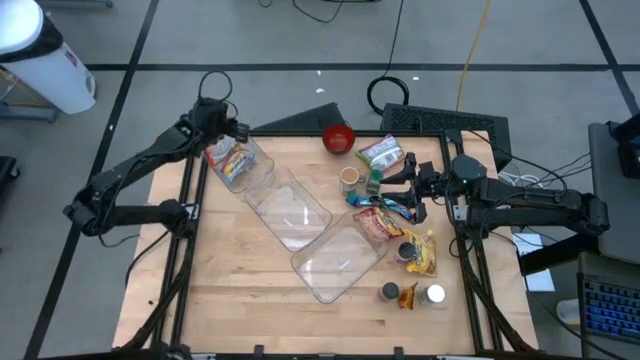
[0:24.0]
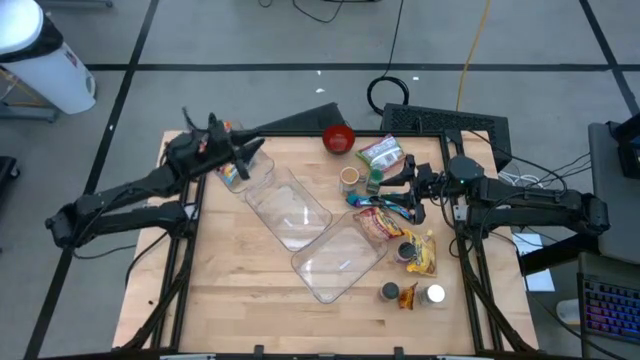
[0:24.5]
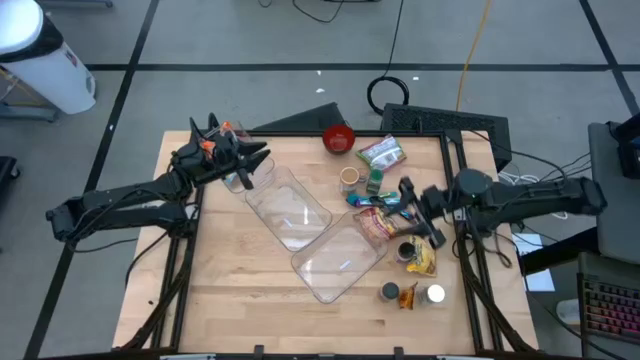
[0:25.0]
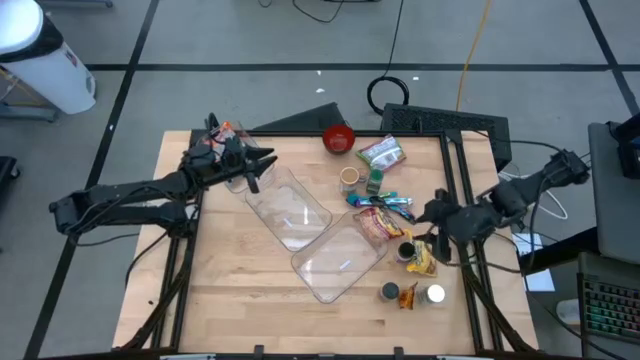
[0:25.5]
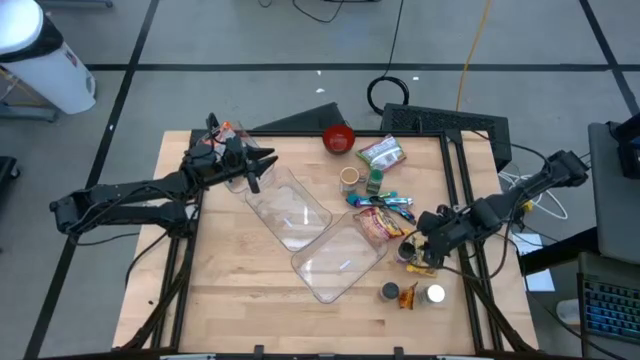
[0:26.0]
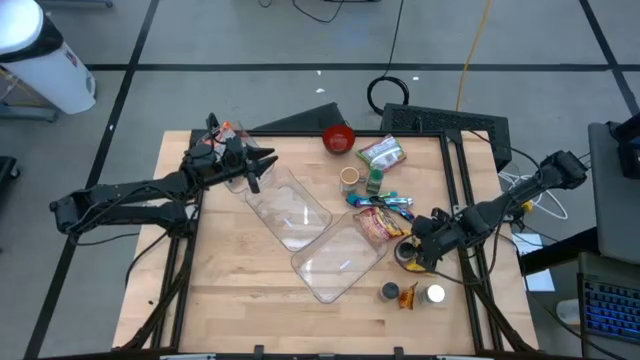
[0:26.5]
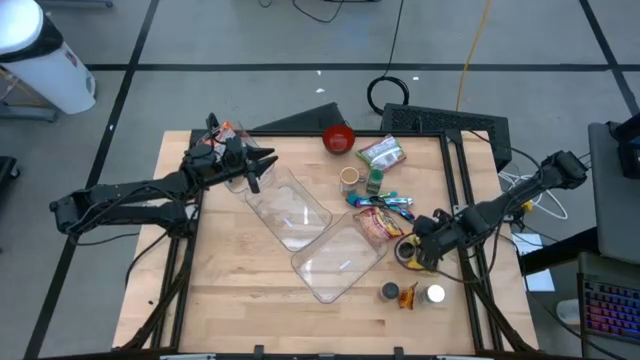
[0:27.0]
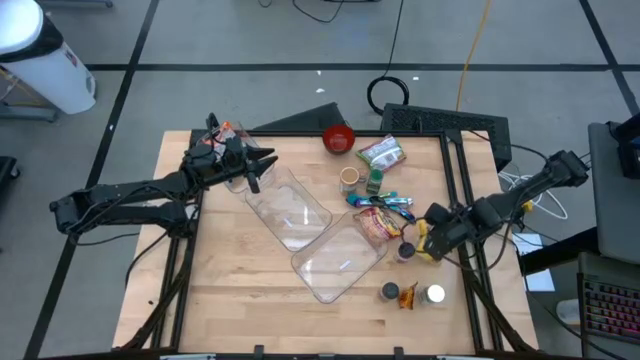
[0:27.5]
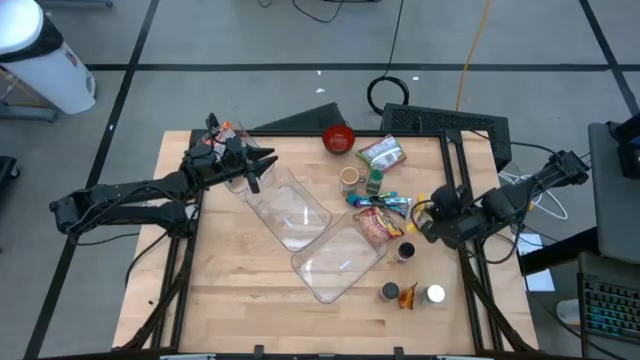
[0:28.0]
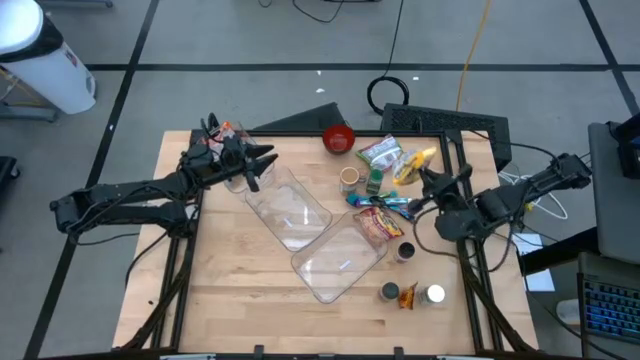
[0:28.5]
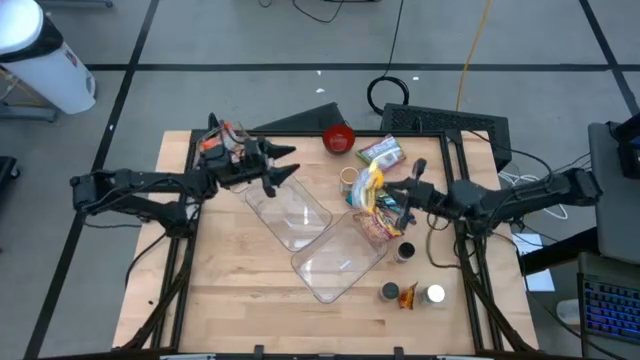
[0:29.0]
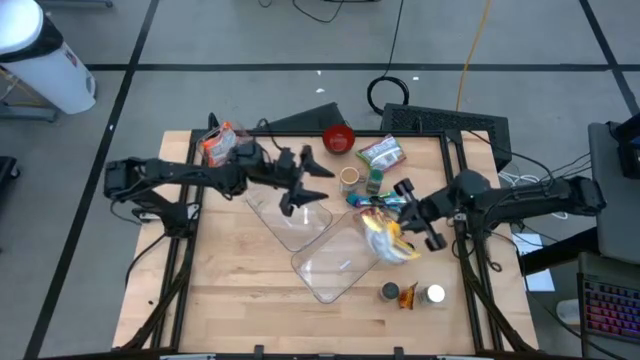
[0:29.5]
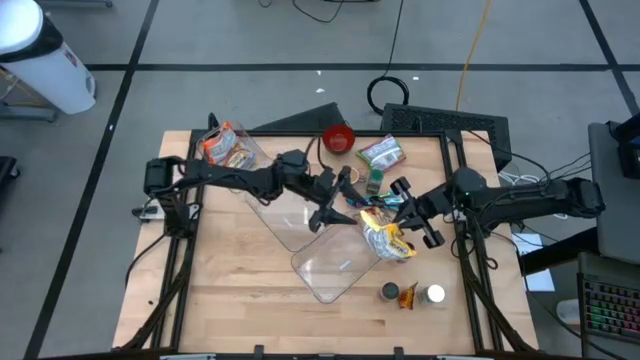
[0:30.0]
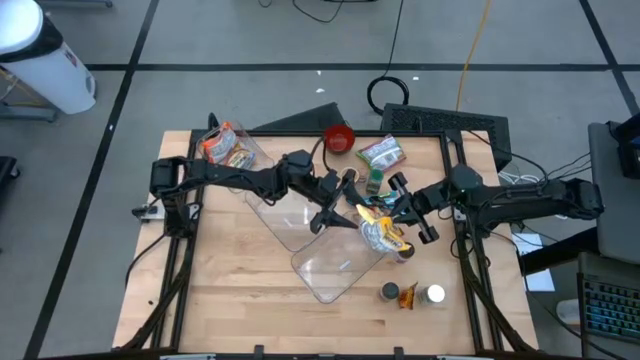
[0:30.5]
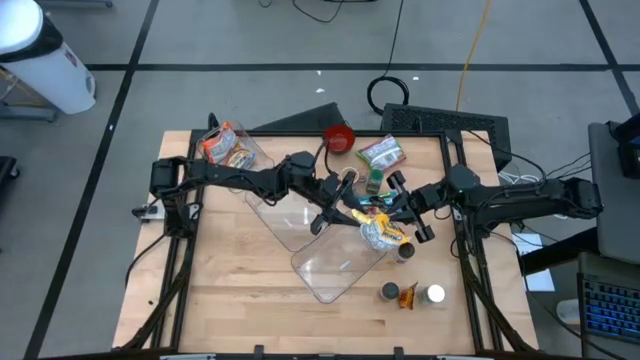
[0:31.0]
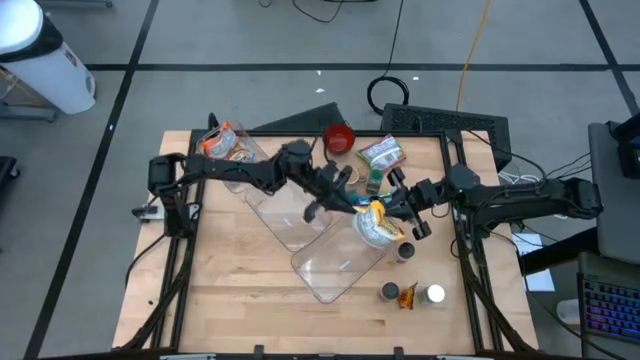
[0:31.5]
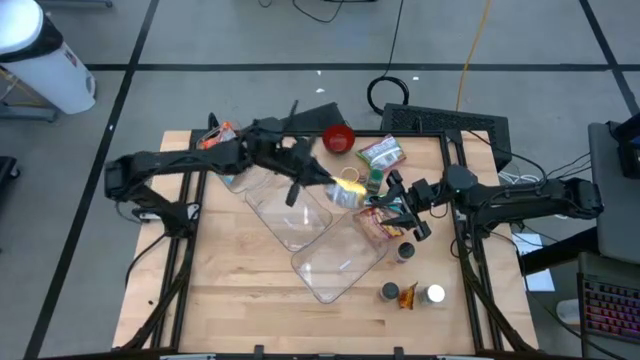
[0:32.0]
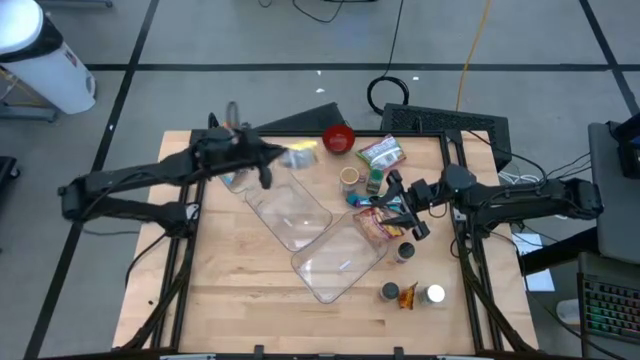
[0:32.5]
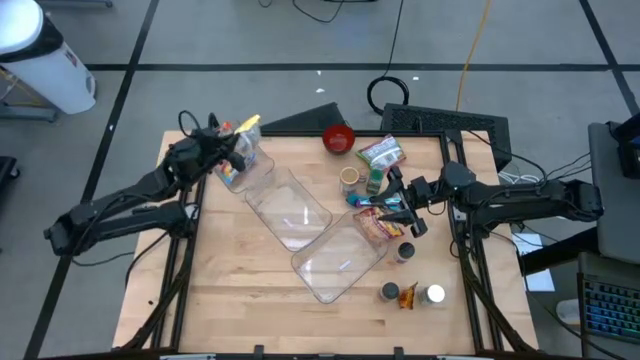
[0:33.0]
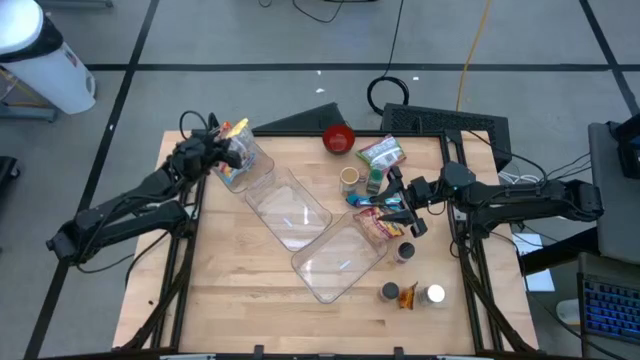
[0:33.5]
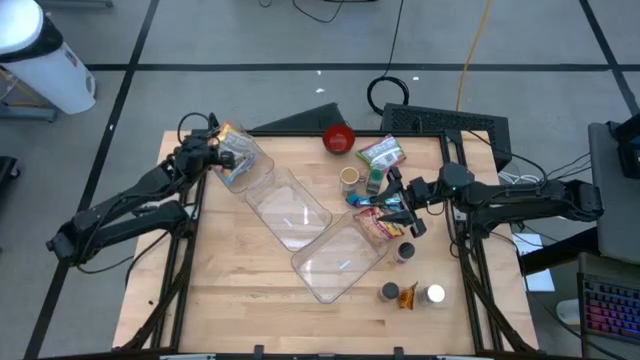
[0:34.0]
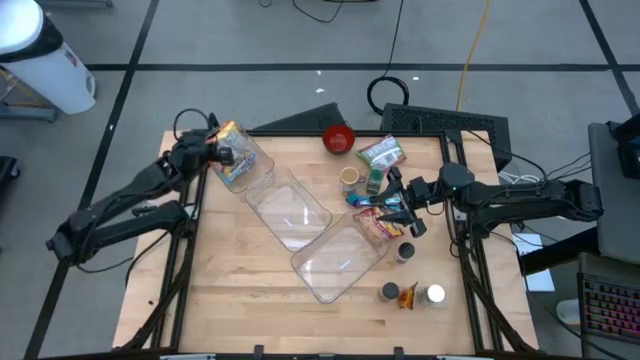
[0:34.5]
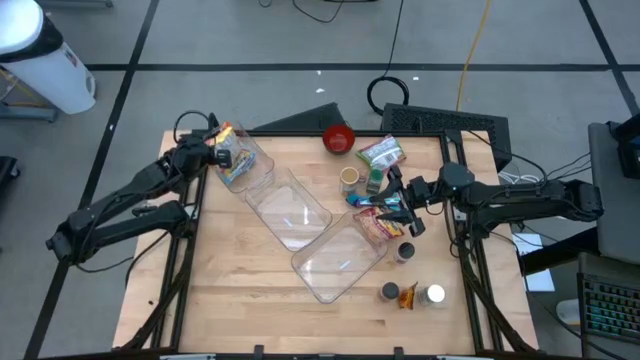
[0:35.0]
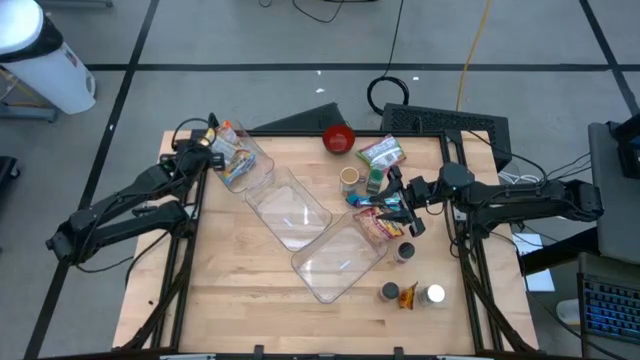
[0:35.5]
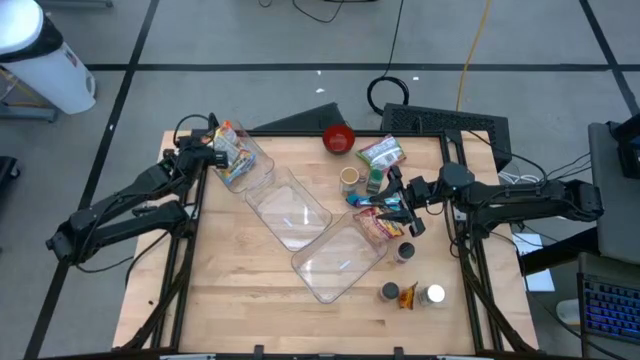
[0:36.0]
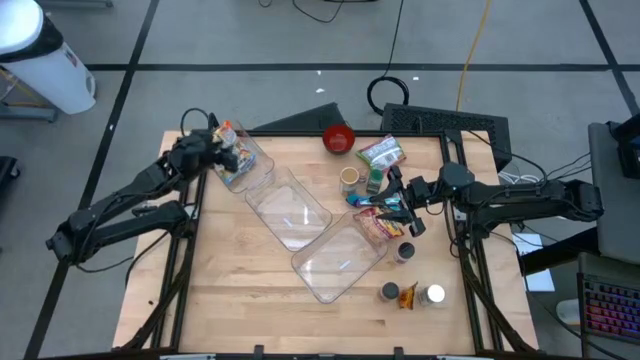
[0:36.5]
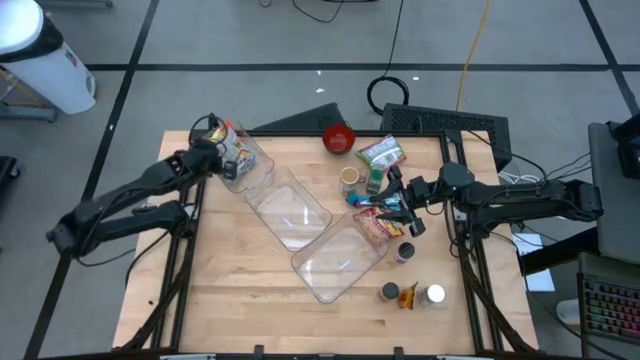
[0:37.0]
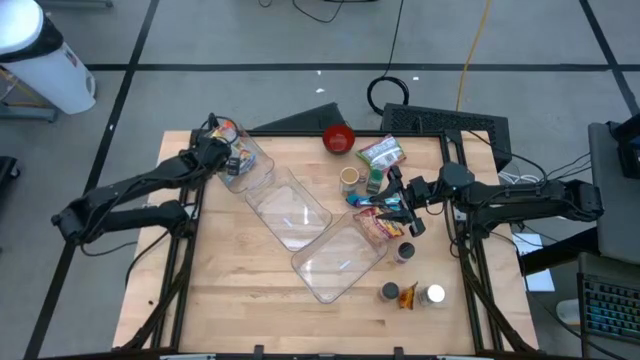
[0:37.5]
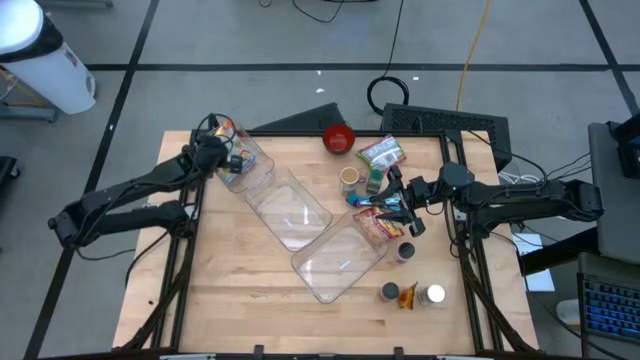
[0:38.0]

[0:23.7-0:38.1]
Task: Pick & Place Food Item
Put the yellow noodle pack into the top transparent bin

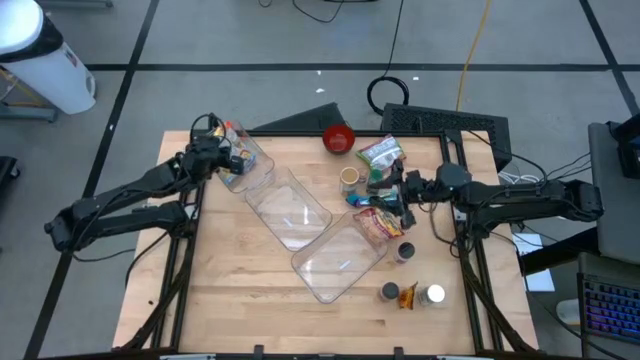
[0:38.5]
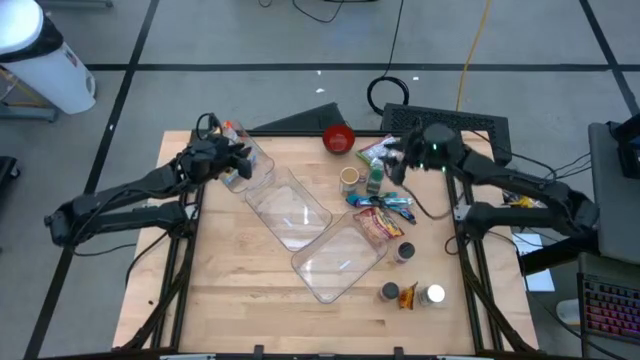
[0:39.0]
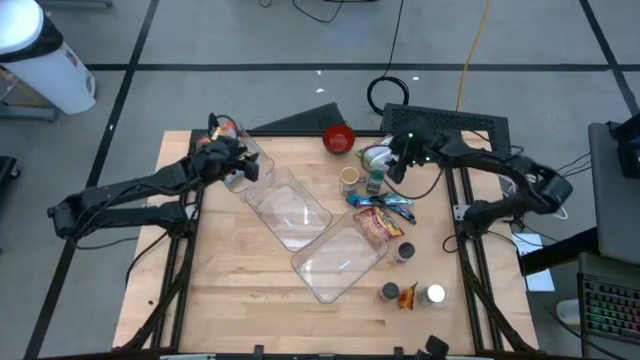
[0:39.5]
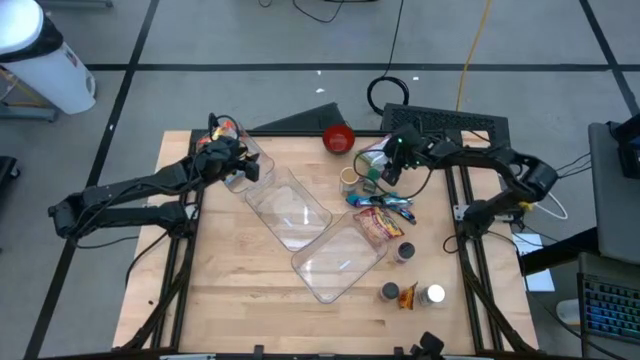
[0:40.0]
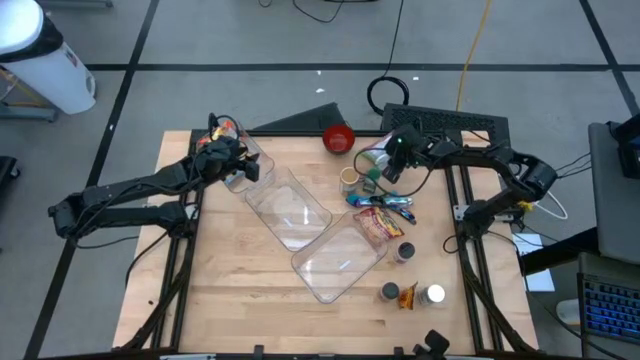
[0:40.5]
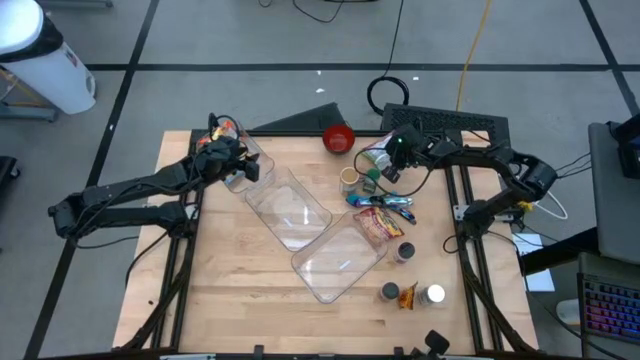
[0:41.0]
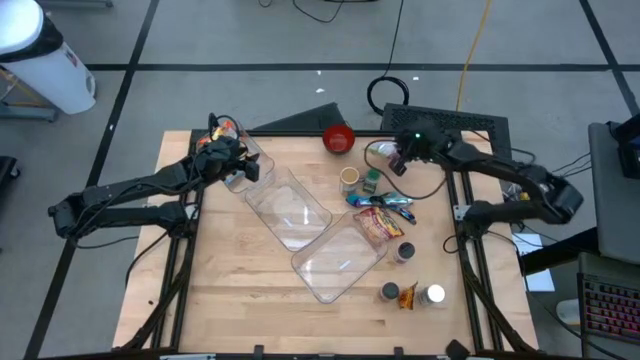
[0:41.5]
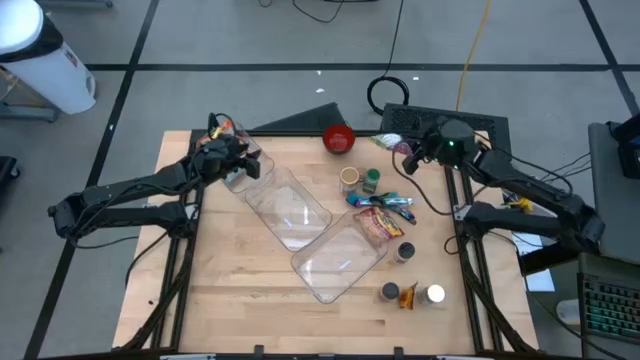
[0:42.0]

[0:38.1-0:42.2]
Put the green noodle pack into the top transparent bin

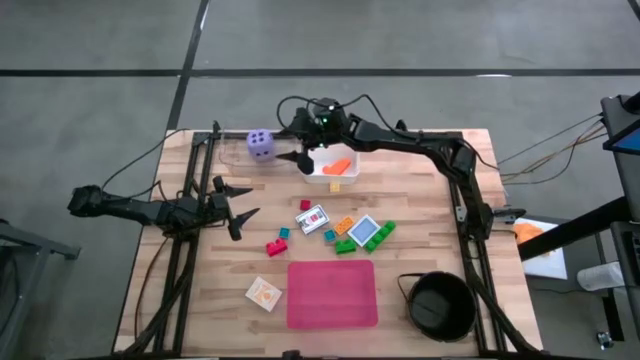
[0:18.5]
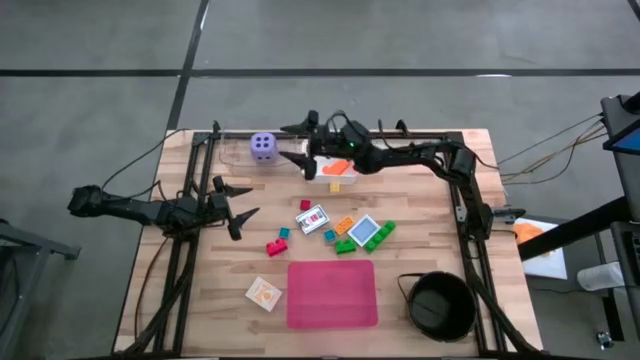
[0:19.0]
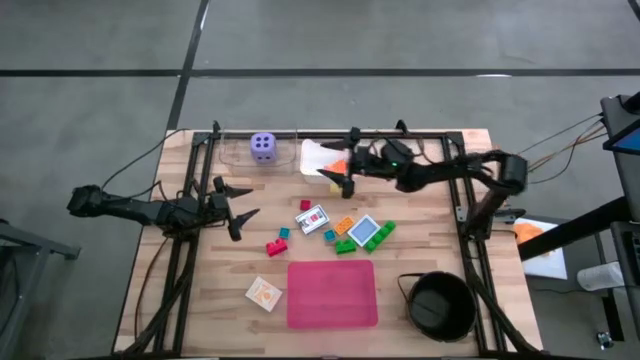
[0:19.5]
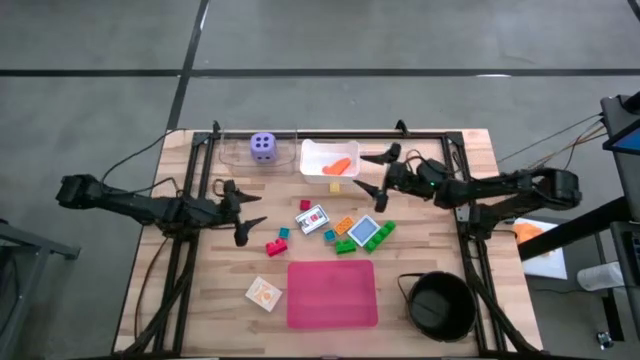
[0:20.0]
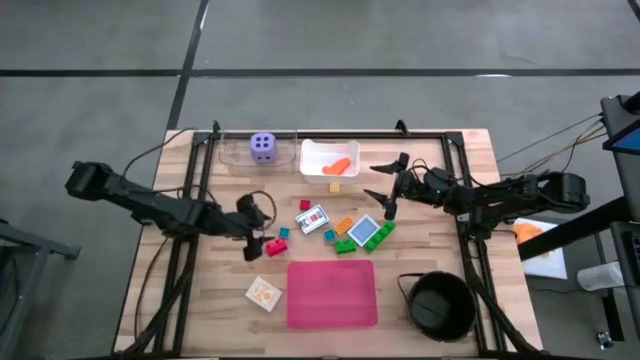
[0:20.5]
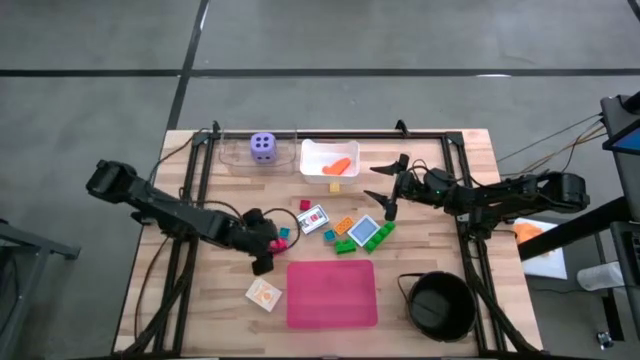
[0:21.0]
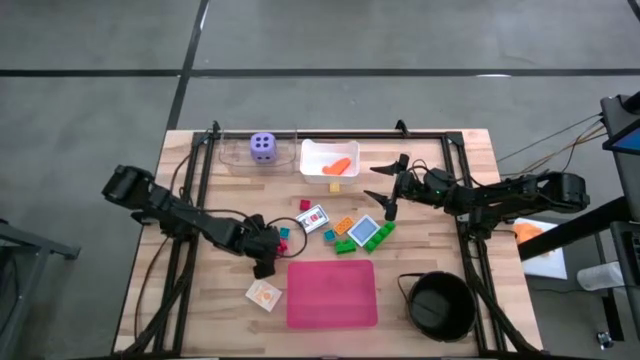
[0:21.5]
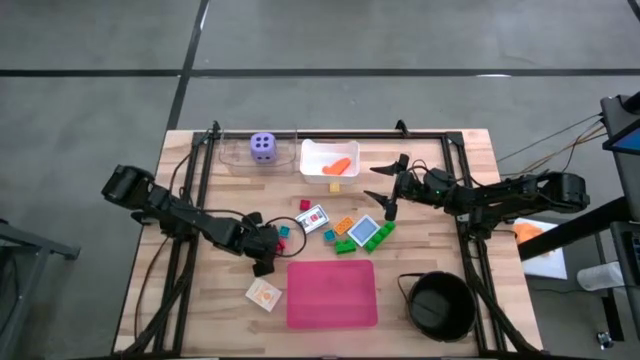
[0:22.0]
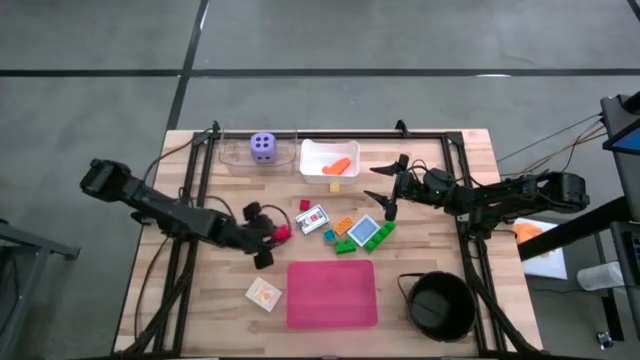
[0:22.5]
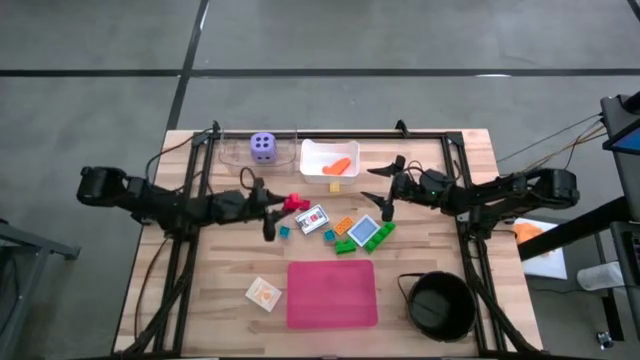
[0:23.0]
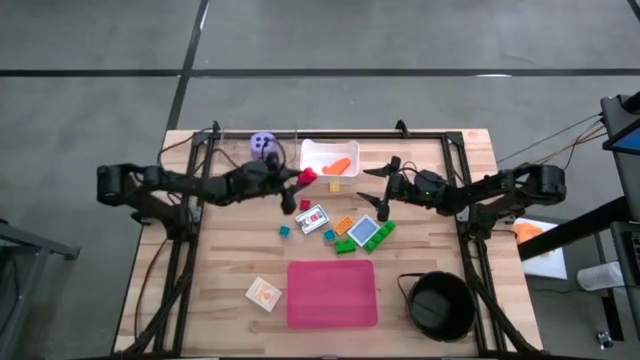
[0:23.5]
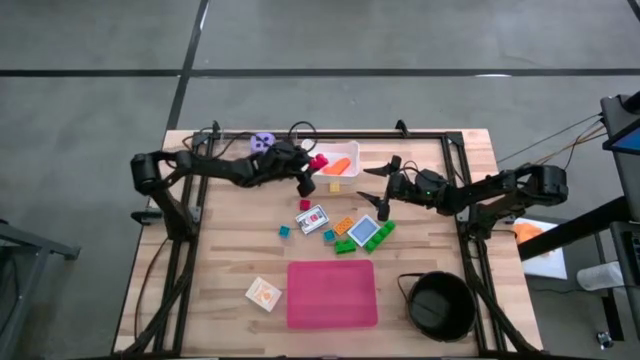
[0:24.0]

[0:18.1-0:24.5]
Task: Pick & Place Toys
Put the red two stud game piece into the white bin
